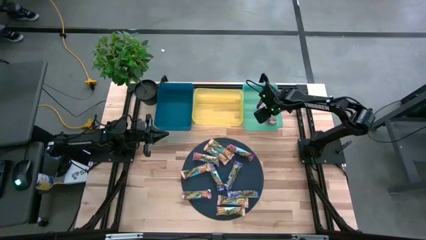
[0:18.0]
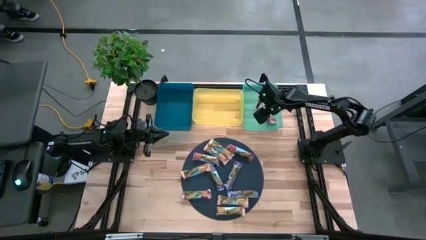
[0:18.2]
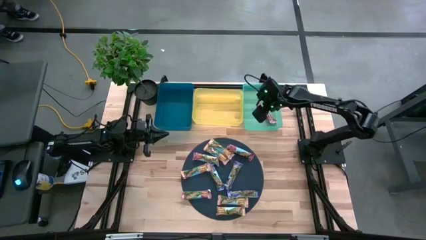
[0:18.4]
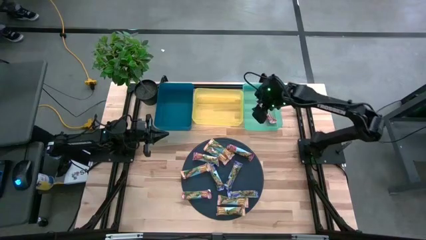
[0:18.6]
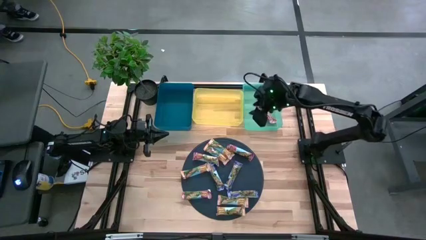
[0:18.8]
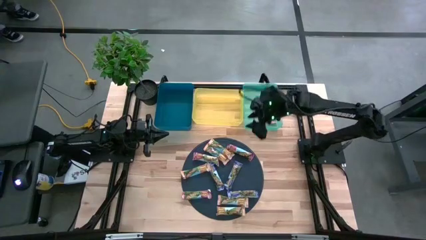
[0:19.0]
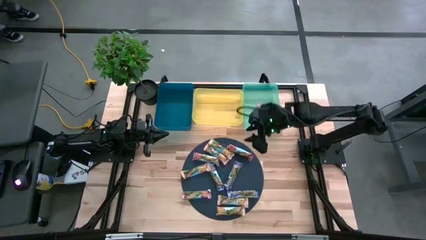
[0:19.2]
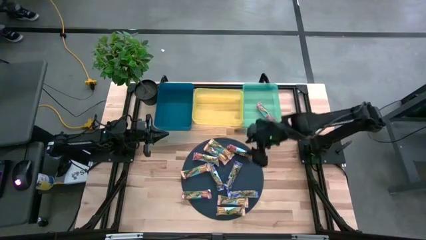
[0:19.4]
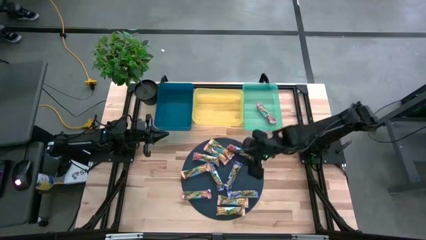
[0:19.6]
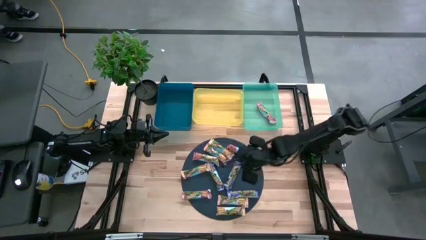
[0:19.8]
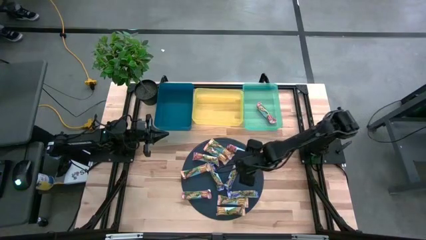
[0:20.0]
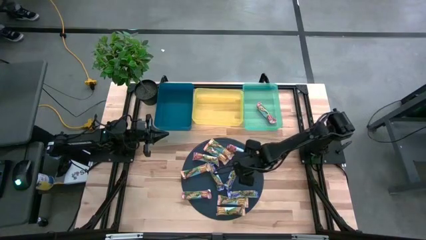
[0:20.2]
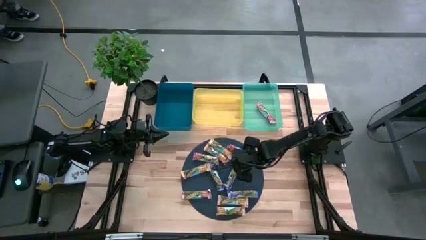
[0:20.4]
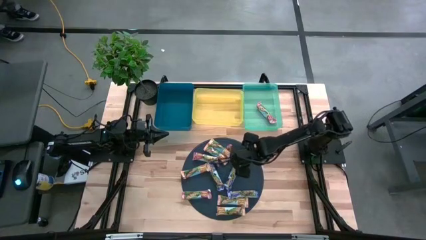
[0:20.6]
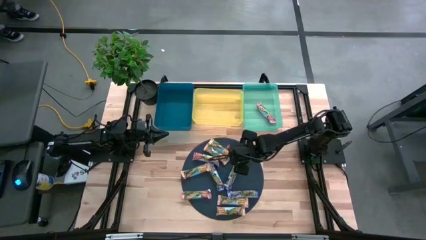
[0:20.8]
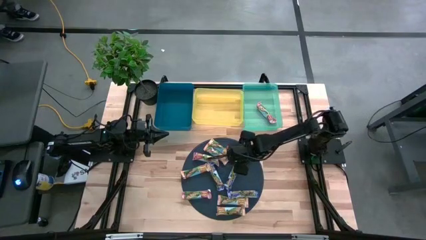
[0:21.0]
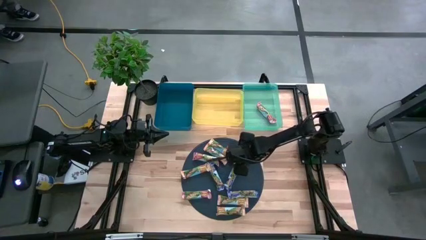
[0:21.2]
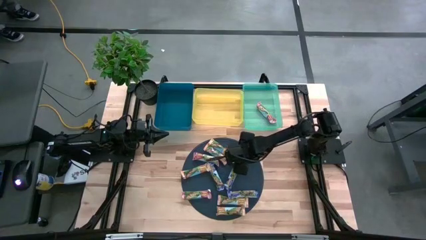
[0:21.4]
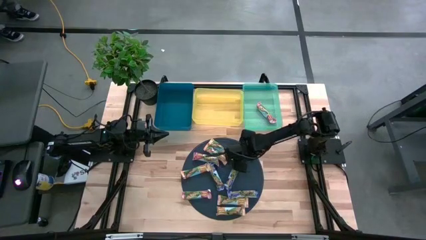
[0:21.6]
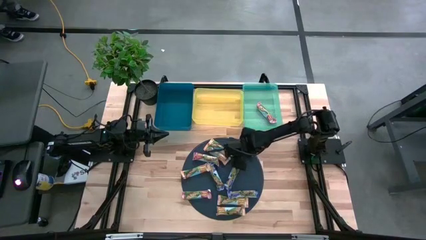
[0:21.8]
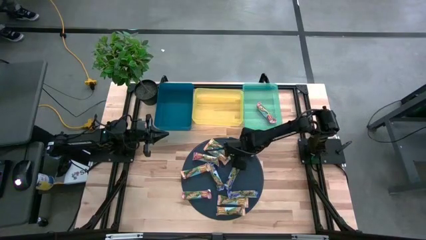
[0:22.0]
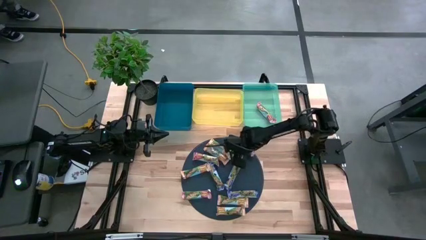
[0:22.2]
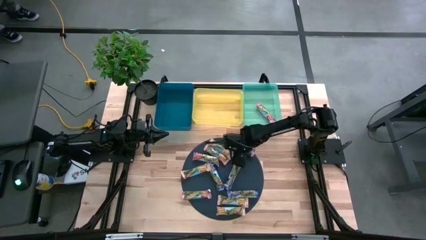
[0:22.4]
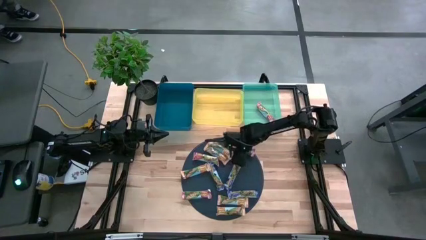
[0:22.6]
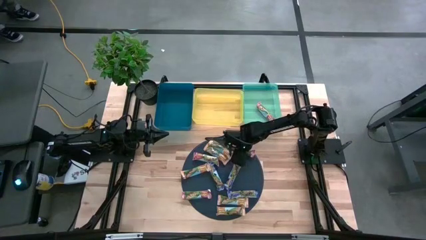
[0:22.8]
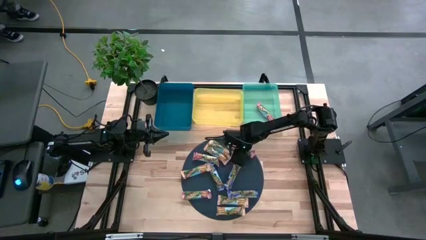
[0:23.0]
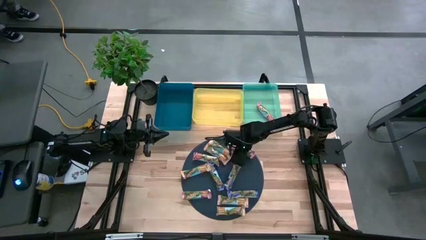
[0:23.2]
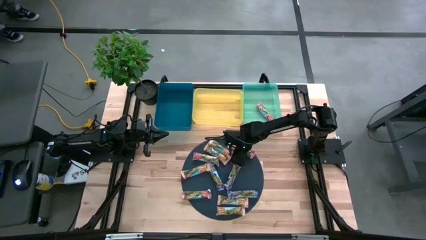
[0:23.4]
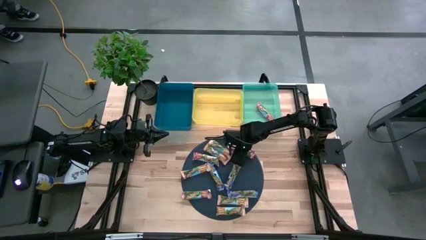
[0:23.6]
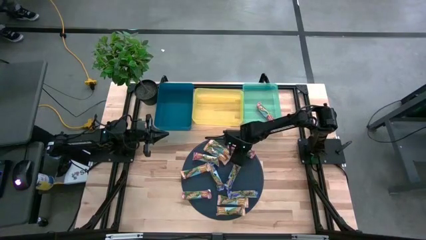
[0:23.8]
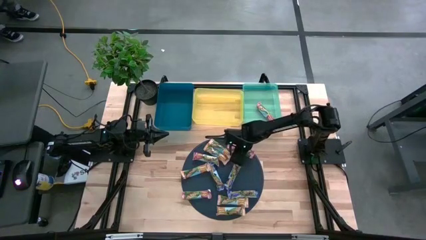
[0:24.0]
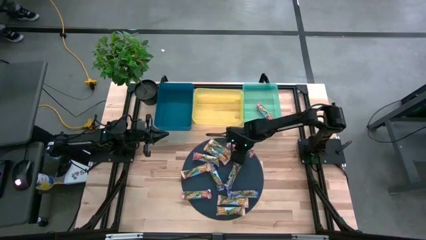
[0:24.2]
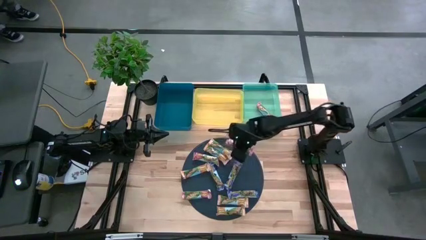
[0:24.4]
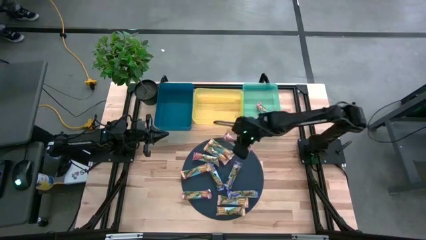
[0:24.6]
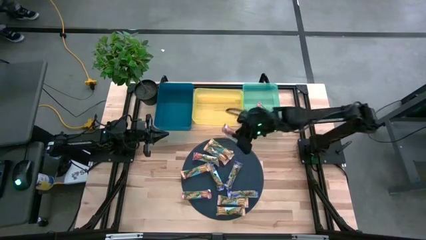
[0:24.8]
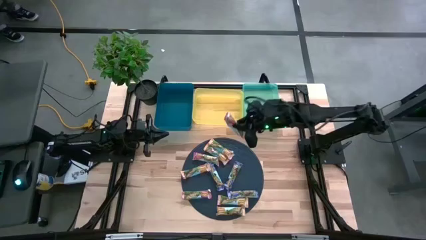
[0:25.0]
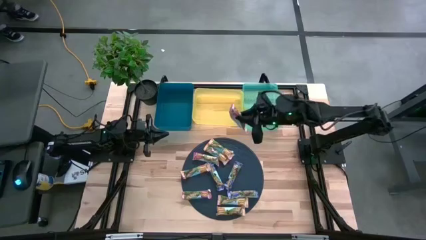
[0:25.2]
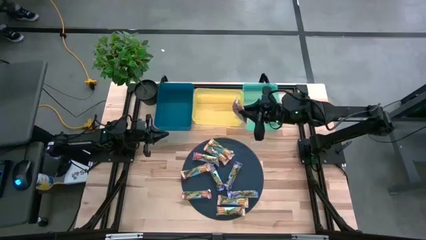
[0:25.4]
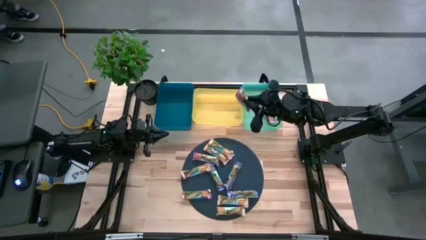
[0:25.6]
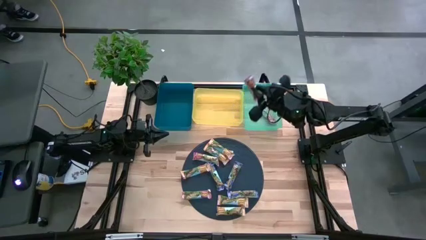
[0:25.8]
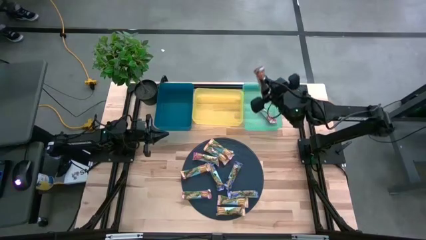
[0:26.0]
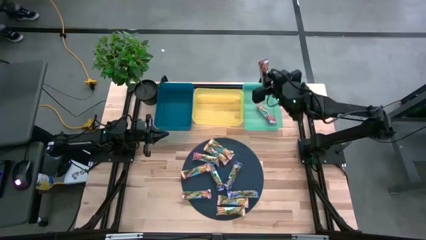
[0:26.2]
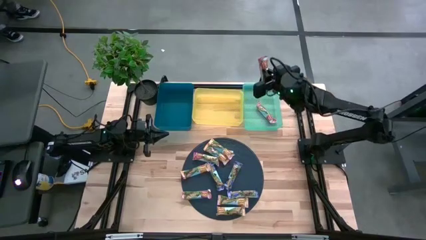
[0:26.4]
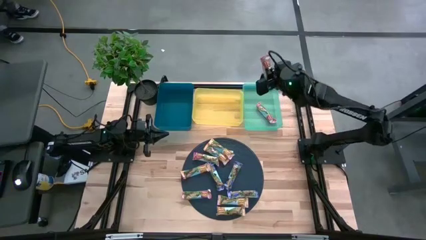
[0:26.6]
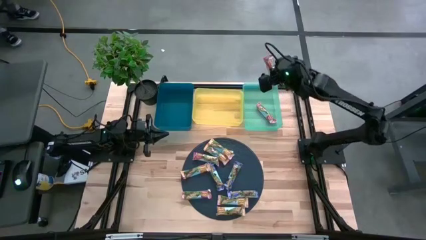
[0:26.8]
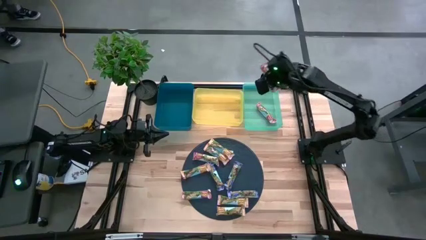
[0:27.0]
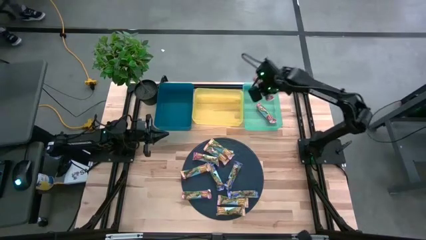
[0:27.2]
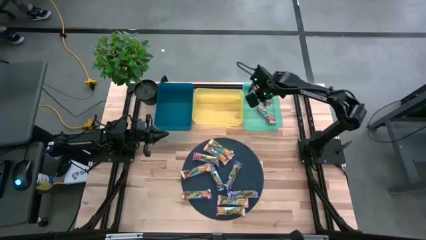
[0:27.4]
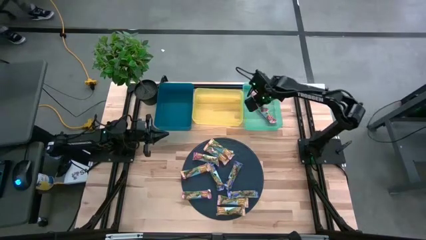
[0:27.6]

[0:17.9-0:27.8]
Task: Pick and place Granola Bars by type
Put the red granola bar into the green bin
